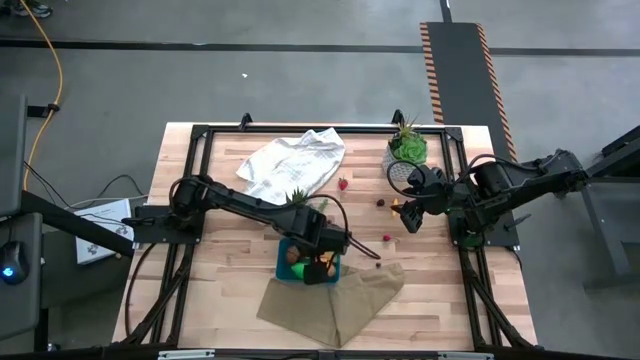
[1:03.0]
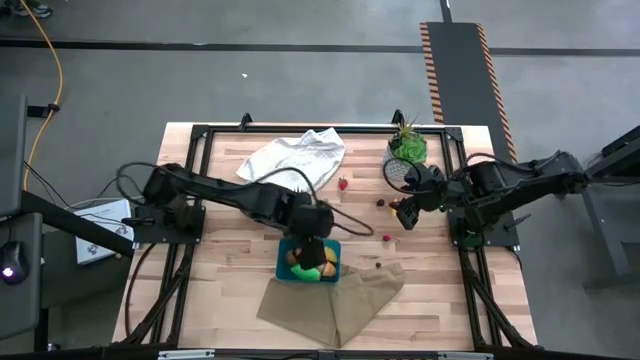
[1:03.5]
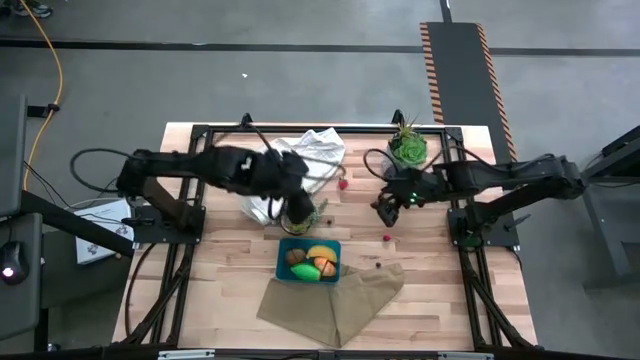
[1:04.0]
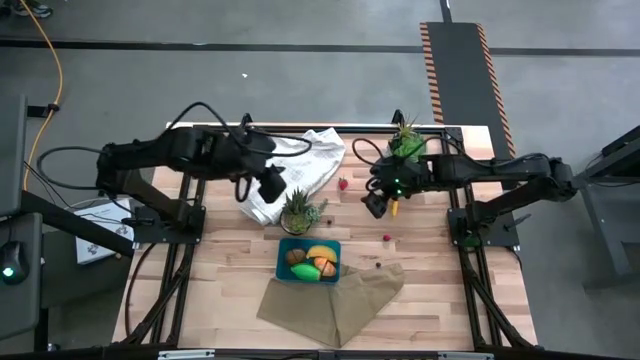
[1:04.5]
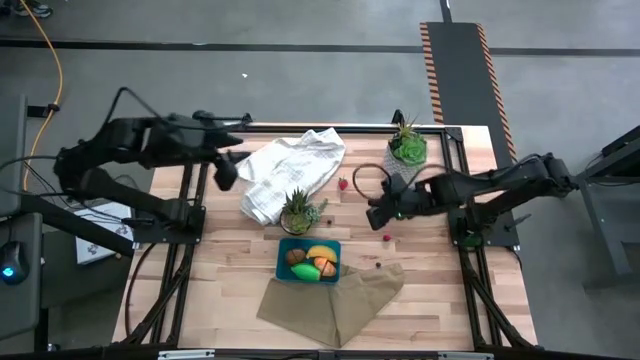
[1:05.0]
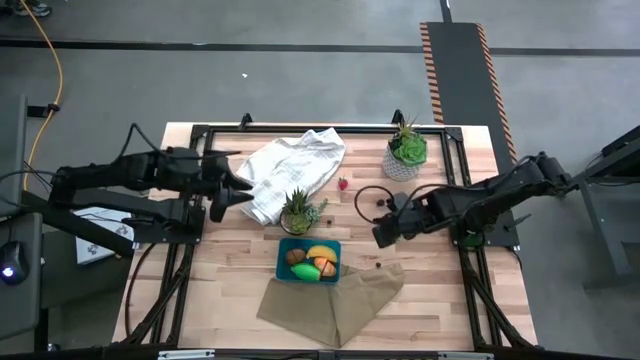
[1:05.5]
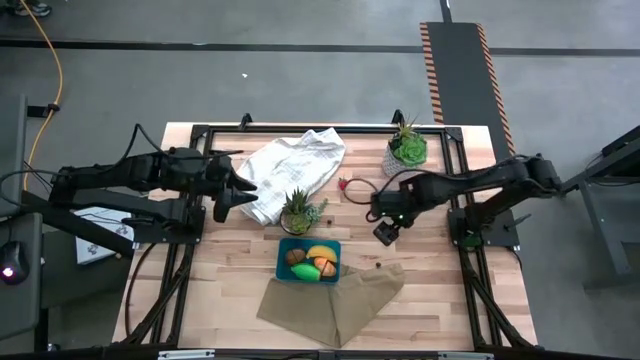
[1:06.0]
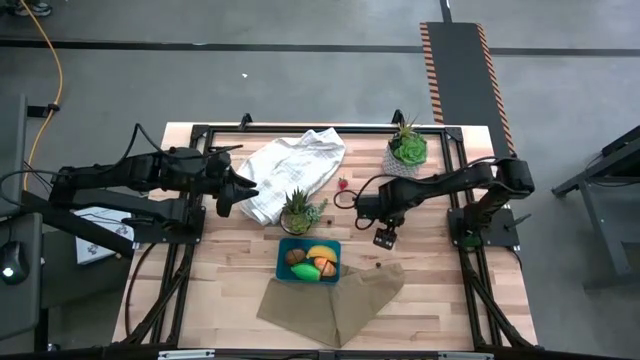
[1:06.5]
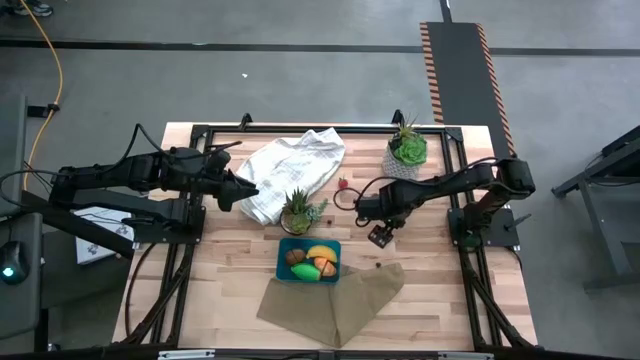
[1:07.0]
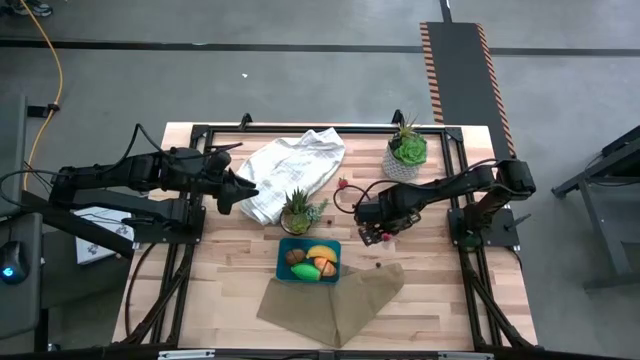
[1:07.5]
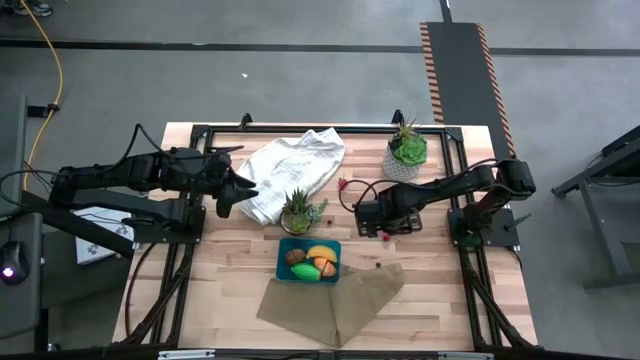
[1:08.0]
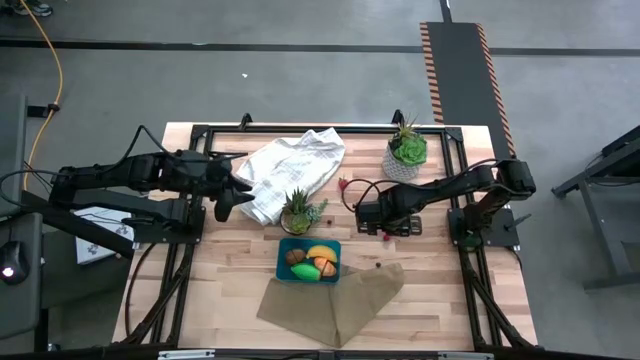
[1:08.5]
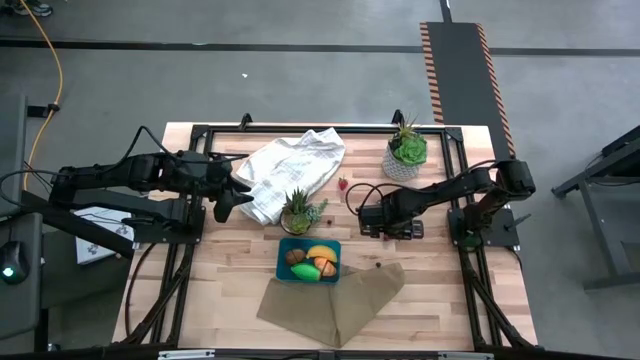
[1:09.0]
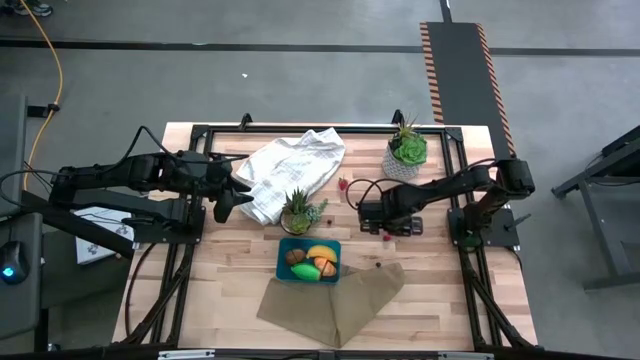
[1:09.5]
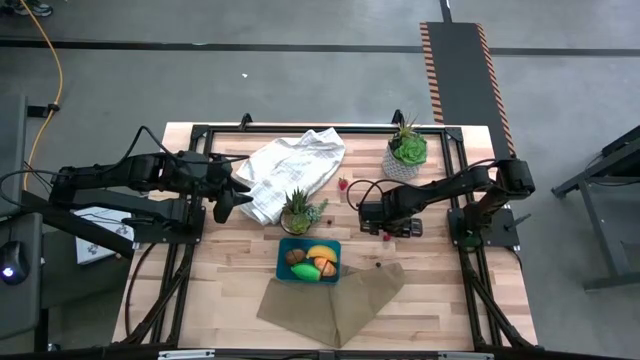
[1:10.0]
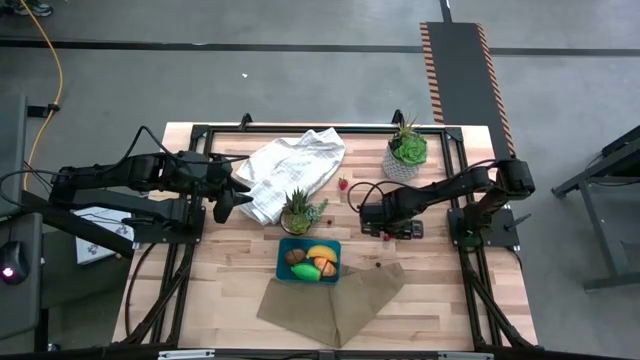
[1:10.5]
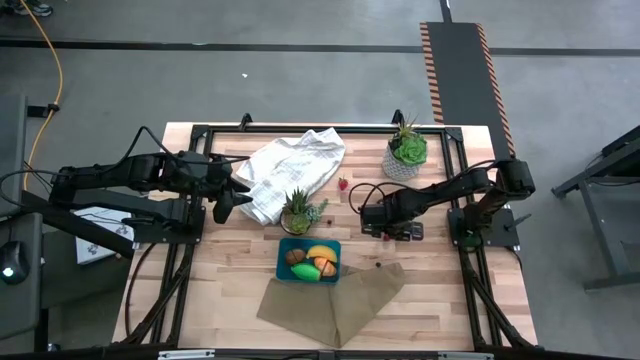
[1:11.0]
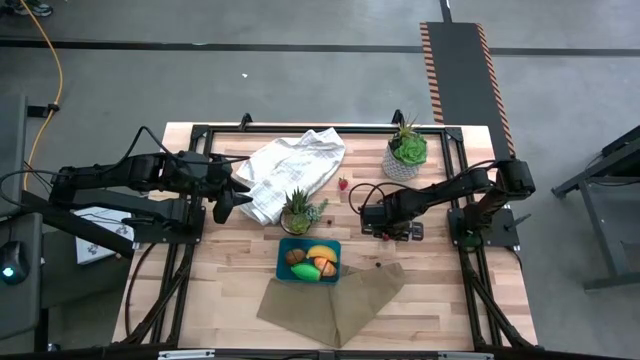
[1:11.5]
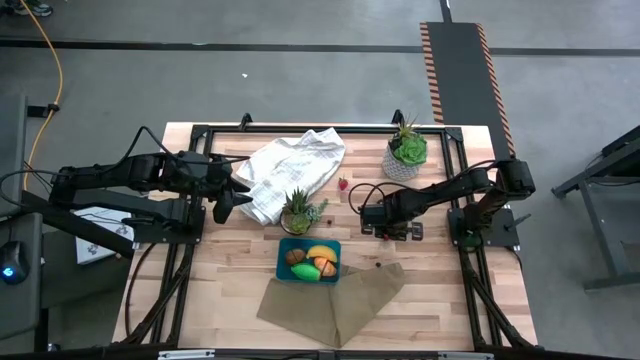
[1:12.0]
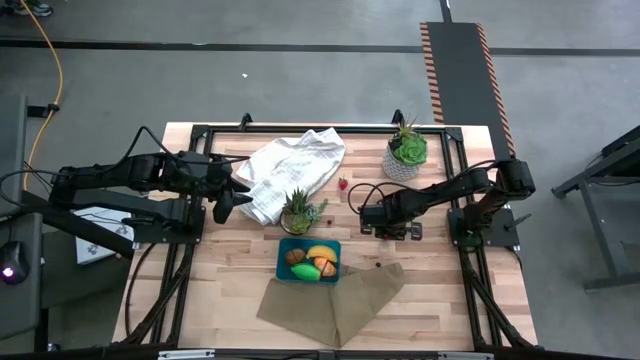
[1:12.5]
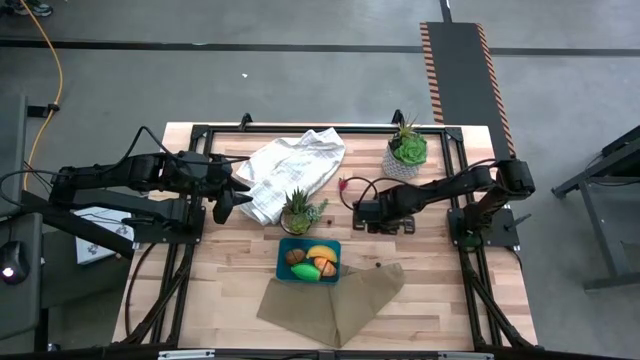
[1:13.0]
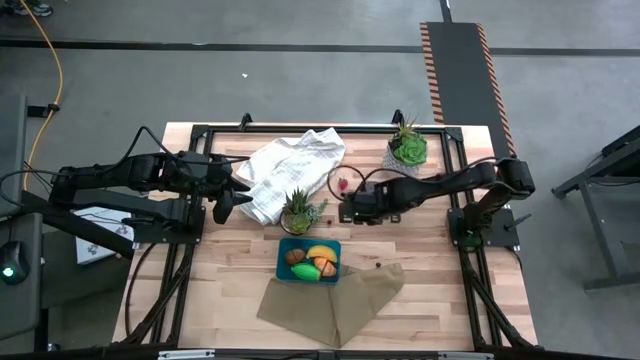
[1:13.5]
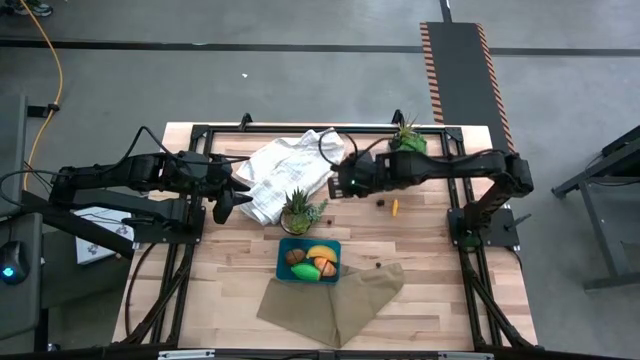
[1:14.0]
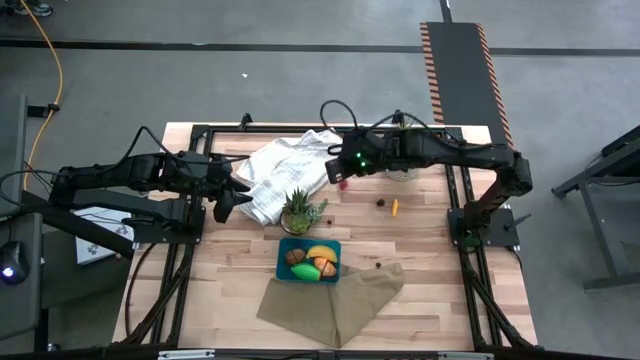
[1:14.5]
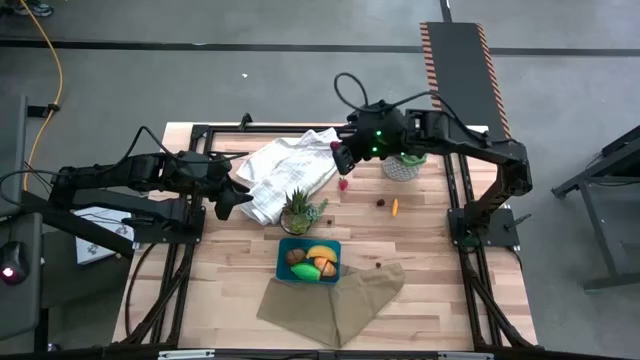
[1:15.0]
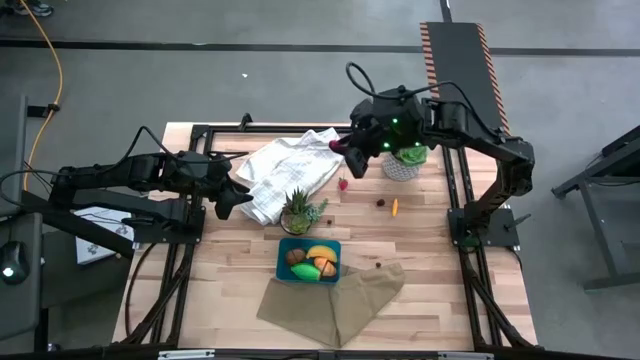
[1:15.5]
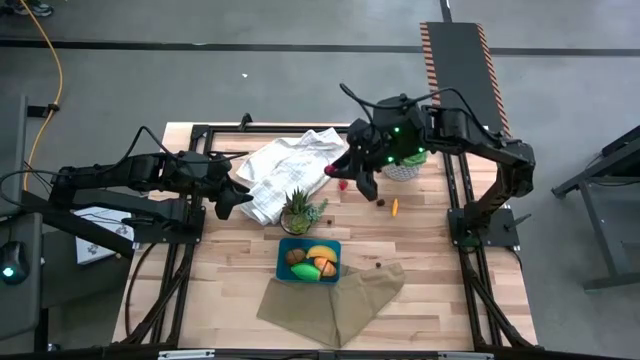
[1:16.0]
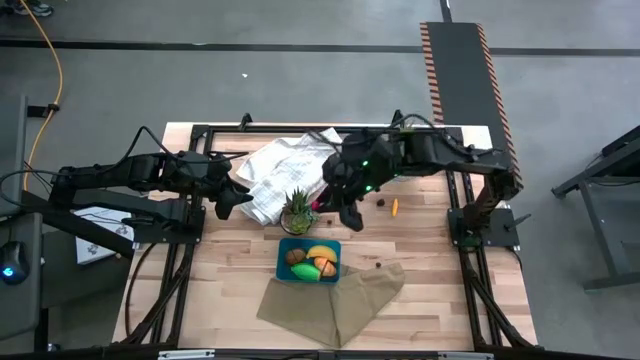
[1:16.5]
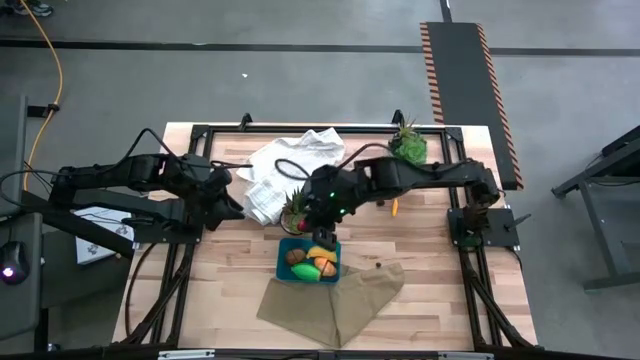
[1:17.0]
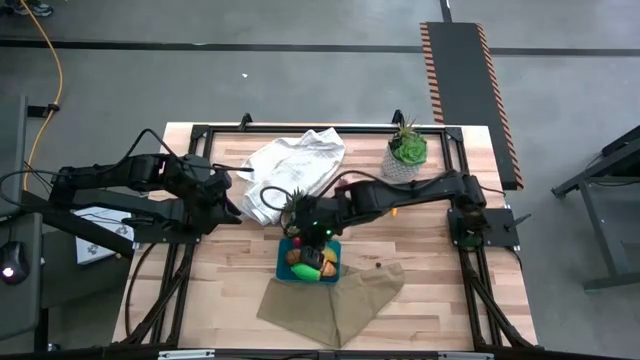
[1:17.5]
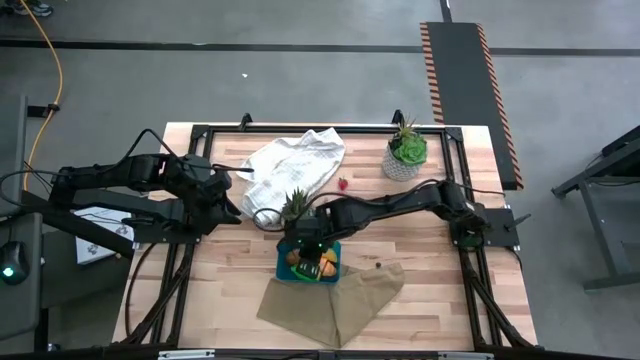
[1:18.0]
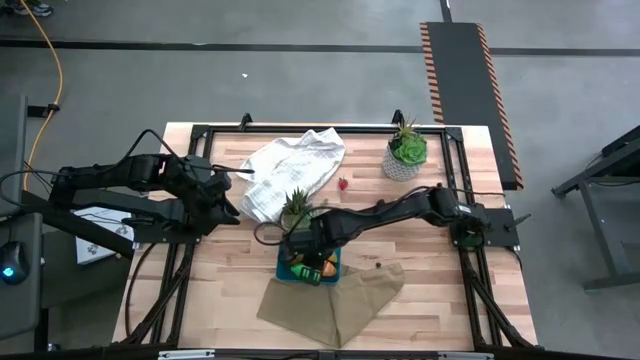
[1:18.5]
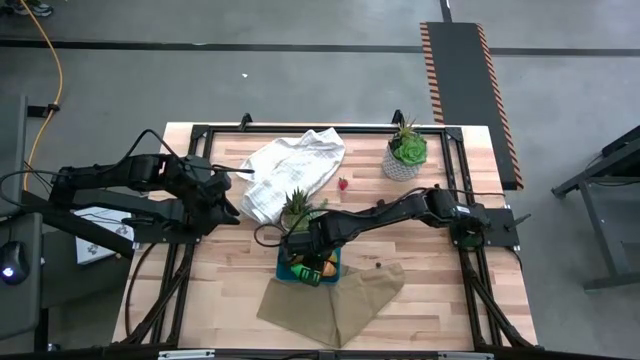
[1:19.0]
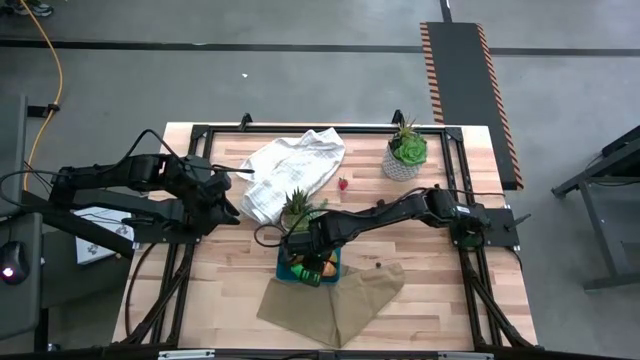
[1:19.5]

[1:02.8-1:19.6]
Task: Pick and placing Produce into tupperware
Put the cherry into the blue bin

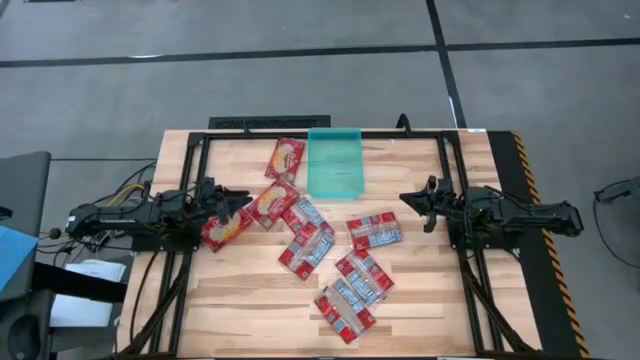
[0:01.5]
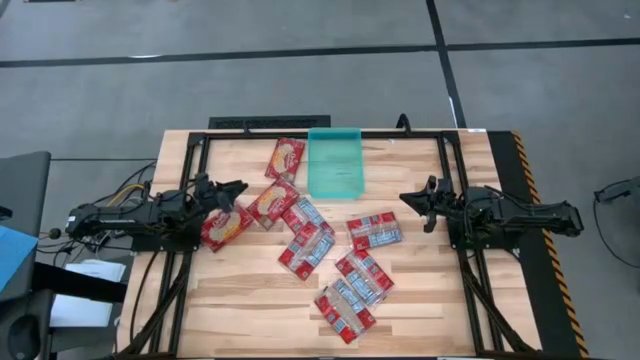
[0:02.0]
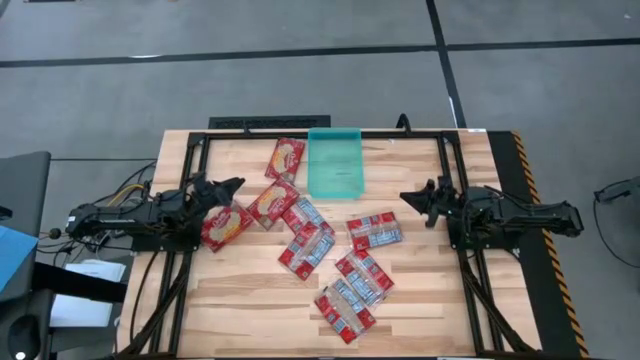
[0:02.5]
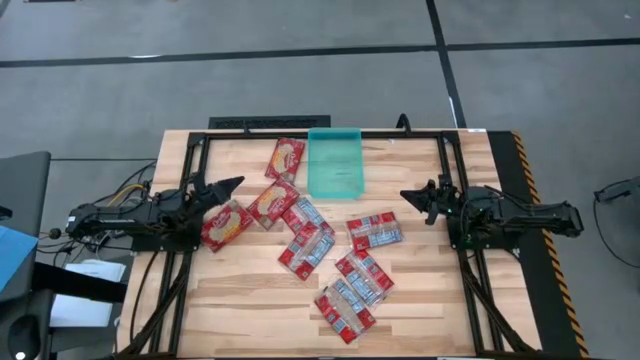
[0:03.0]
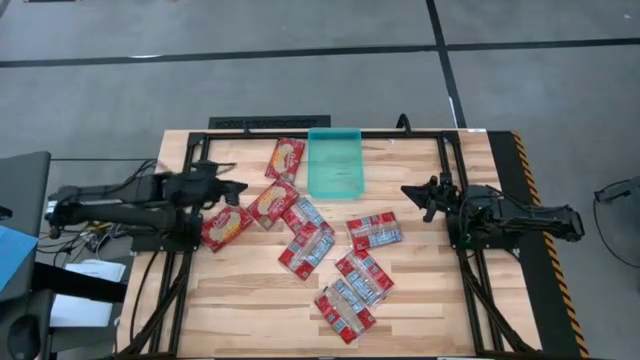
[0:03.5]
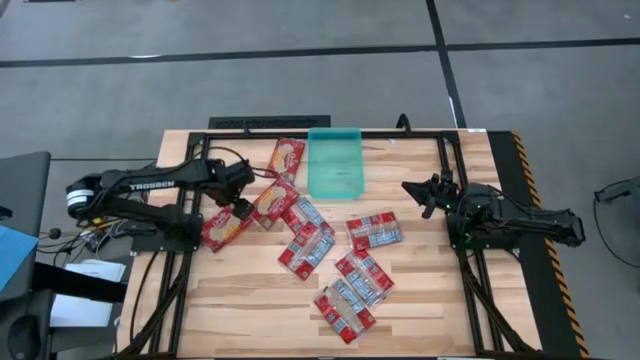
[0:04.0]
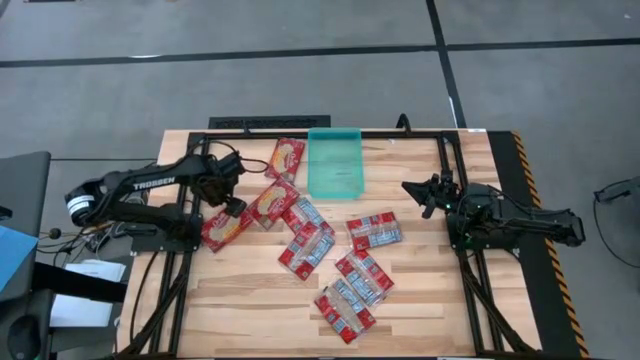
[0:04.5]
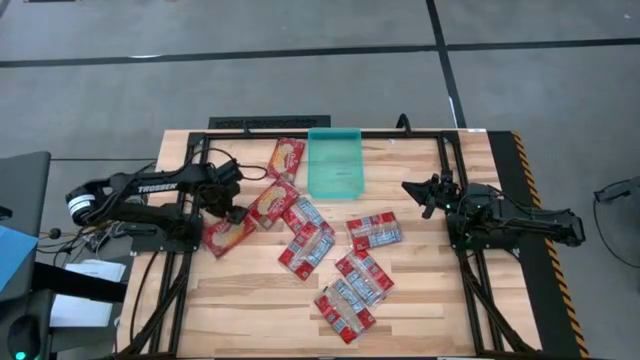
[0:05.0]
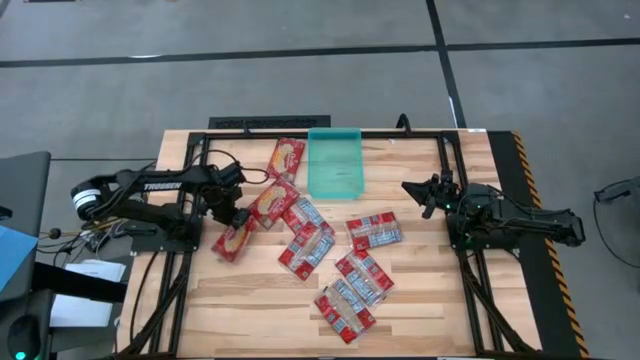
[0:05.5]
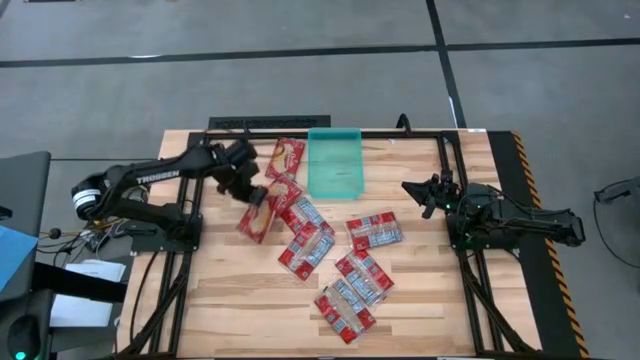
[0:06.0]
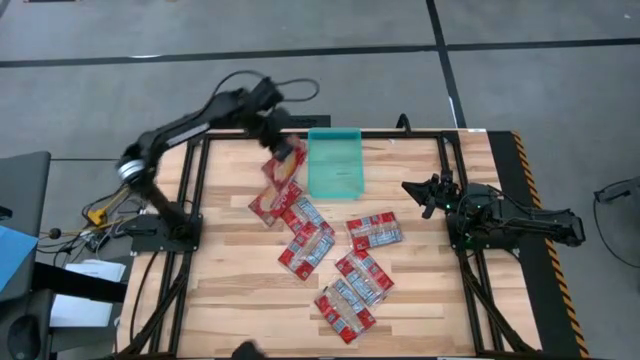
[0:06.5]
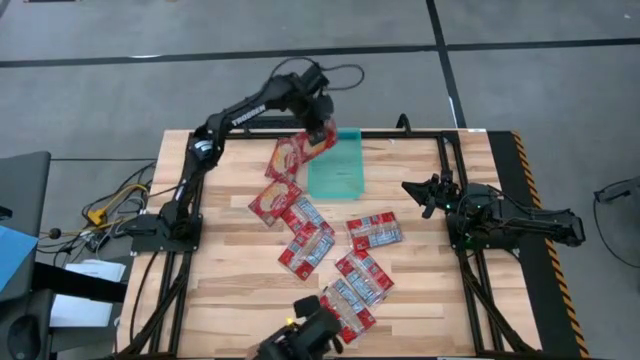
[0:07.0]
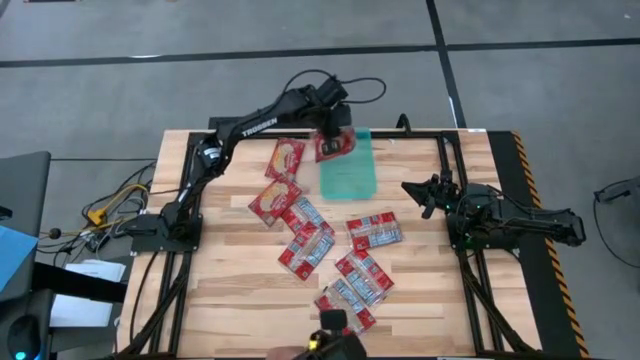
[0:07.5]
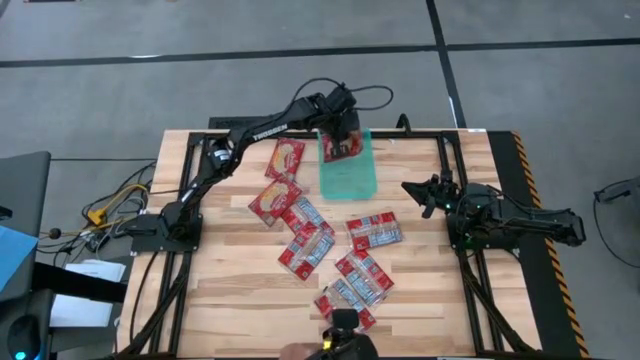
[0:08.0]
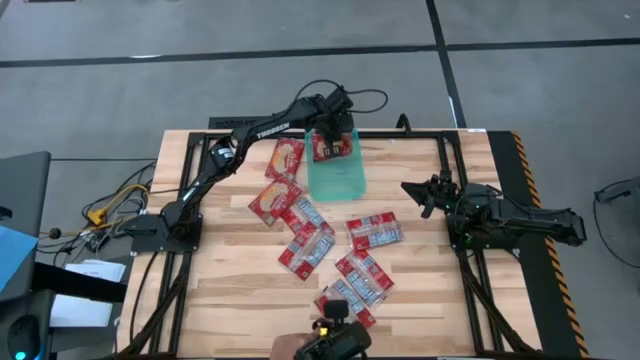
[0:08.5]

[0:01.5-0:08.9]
Task: Sort popcorn bags into baskets
Put the red popcorn bag into the green bin
